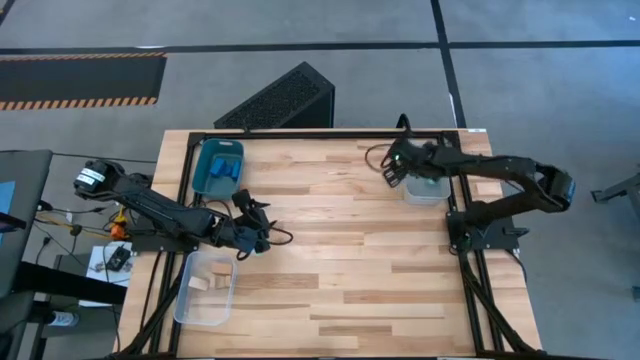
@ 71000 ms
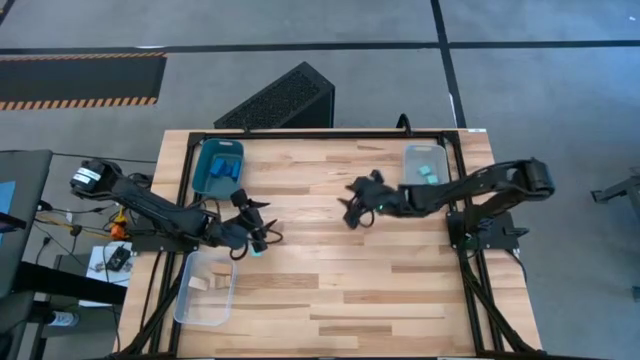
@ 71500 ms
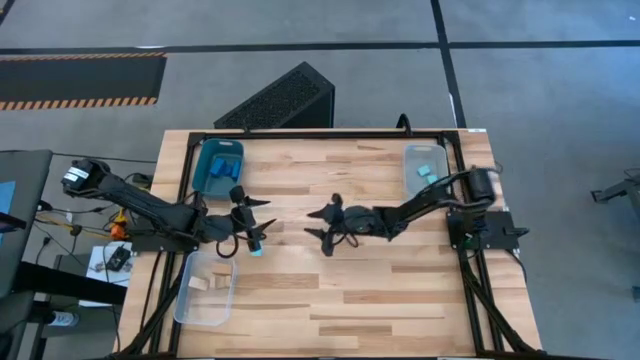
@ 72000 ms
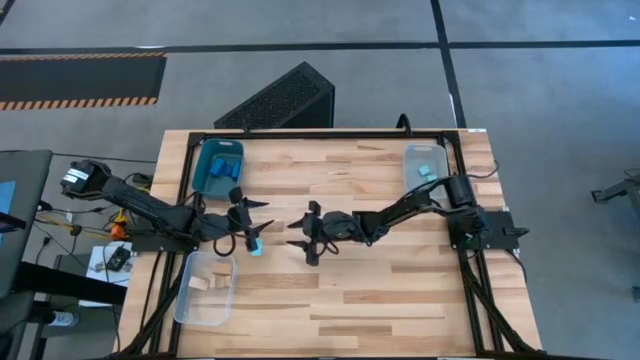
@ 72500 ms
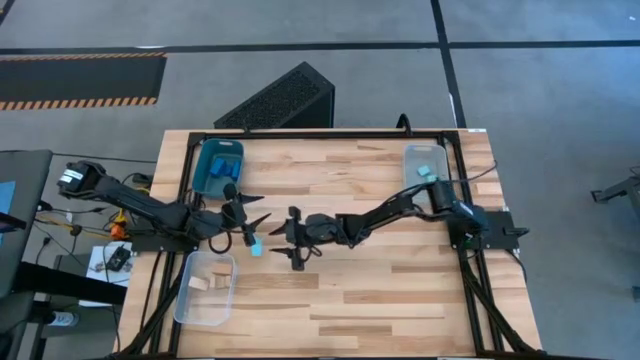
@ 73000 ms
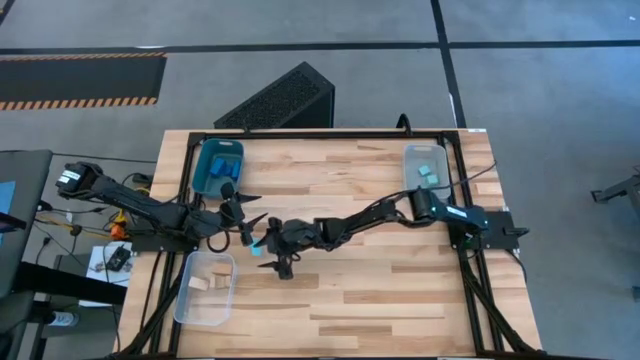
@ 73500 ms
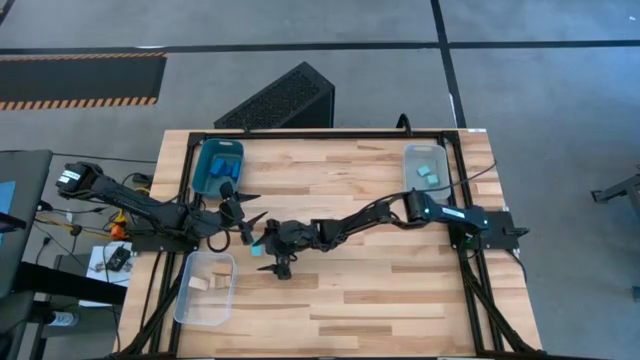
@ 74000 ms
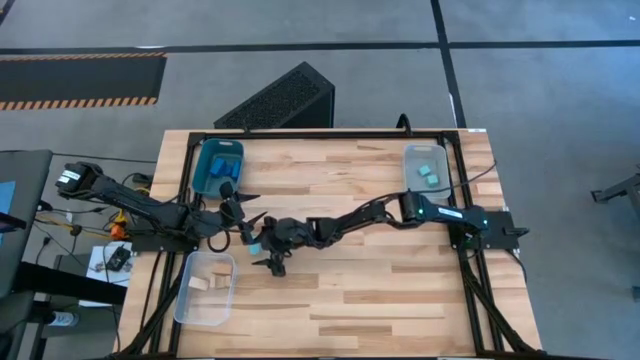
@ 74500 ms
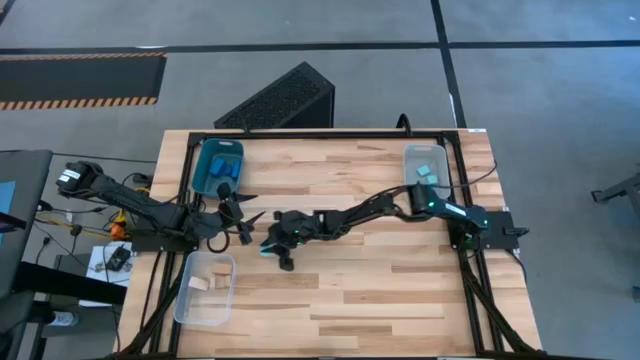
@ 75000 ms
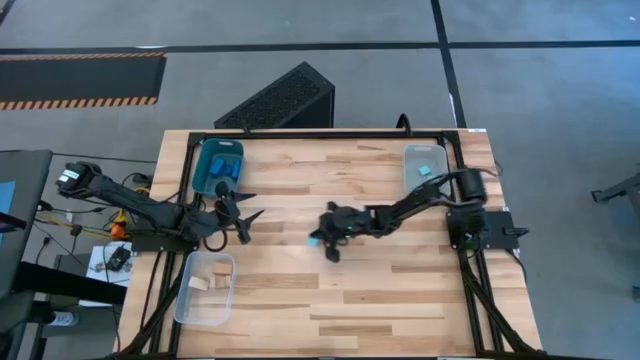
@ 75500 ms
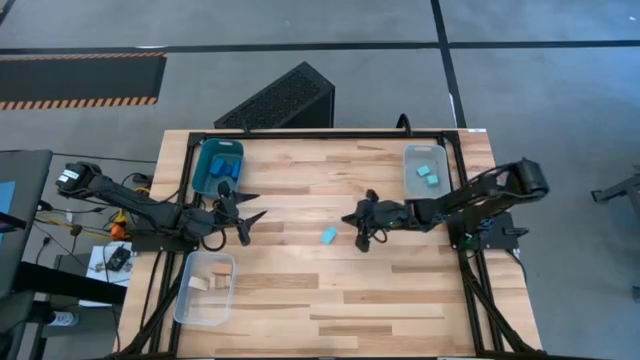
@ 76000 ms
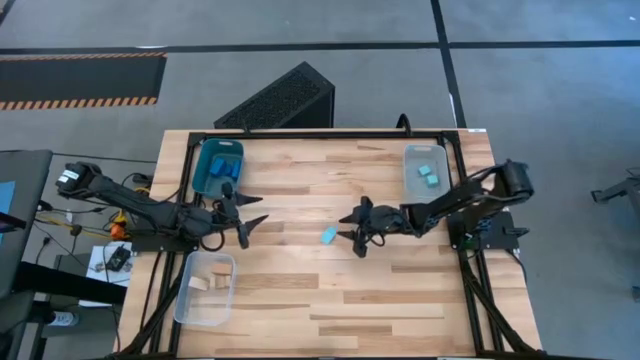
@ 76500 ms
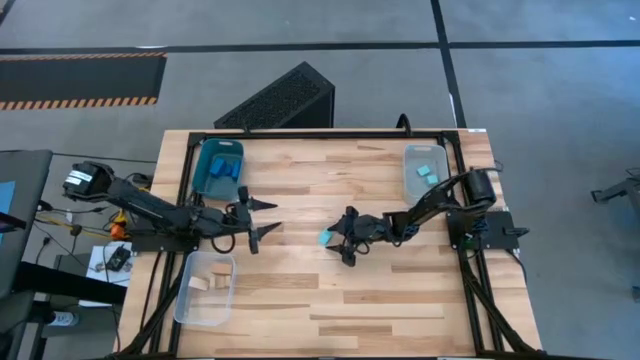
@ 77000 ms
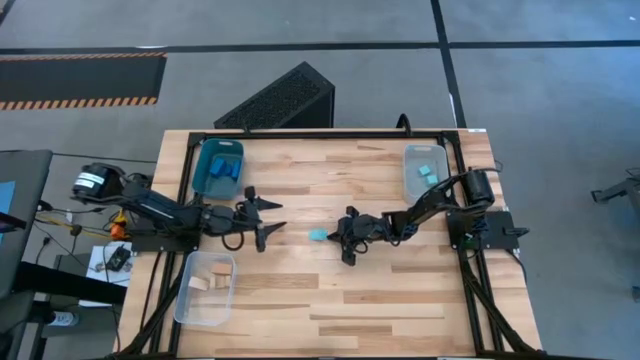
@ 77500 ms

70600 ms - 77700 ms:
Task: Sort & place blocks by color
Put the light blue block into the grey bin

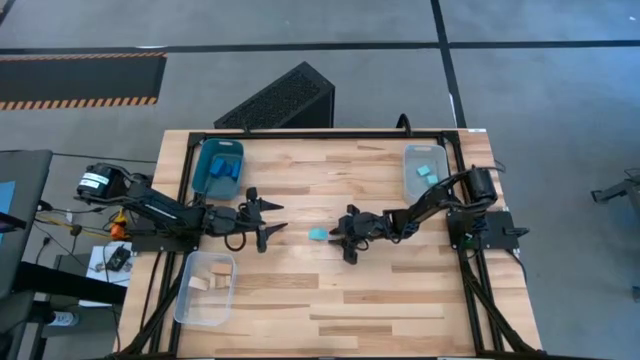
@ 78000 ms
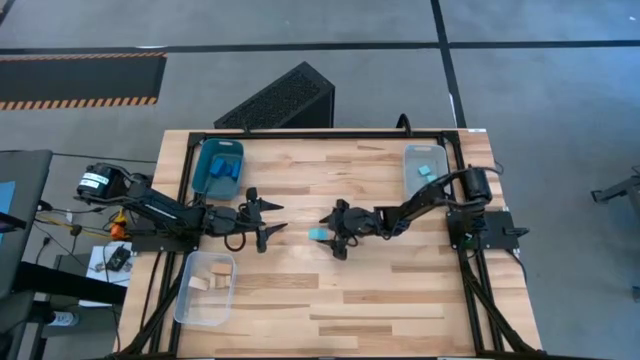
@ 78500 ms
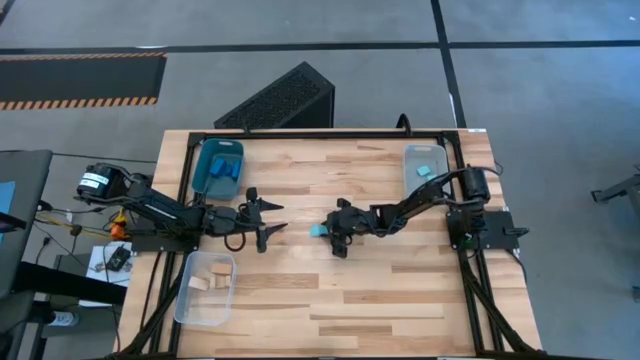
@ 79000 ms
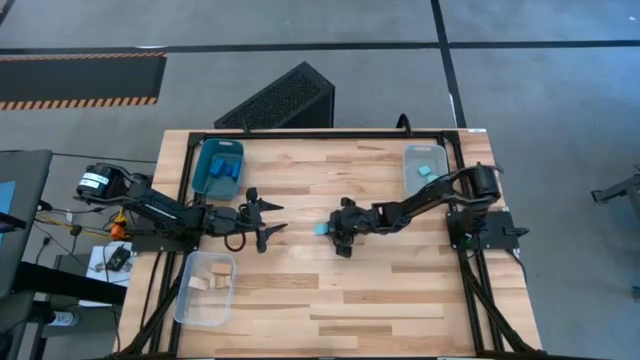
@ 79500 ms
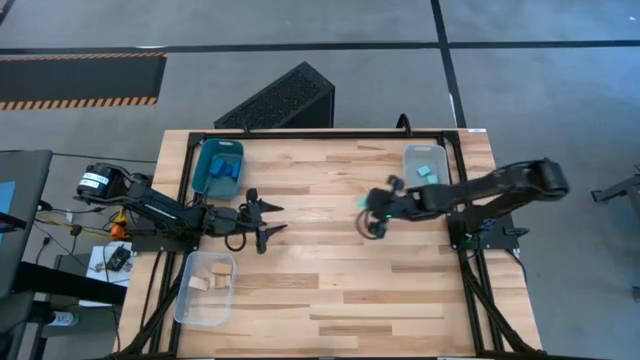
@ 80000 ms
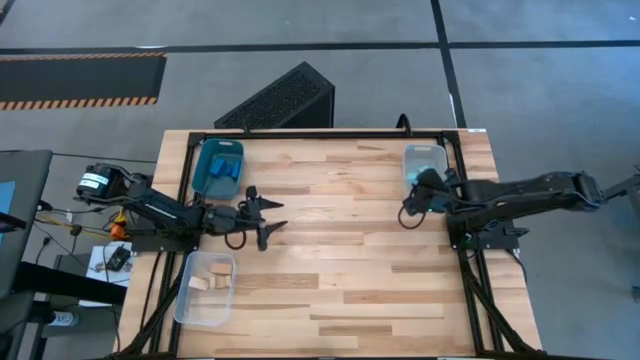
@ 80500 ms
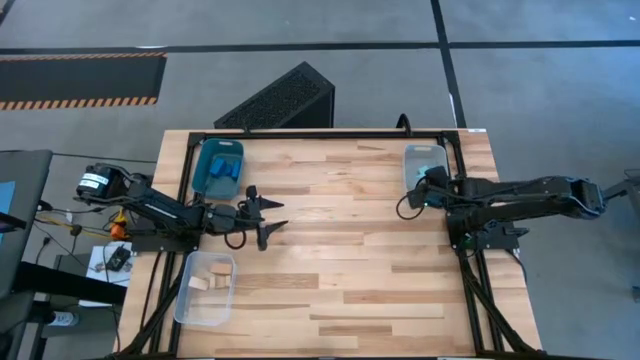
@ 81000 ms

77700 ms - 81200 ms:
Put the light blue block into the grey bin

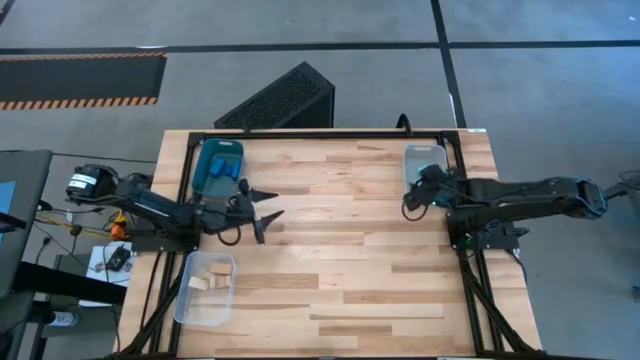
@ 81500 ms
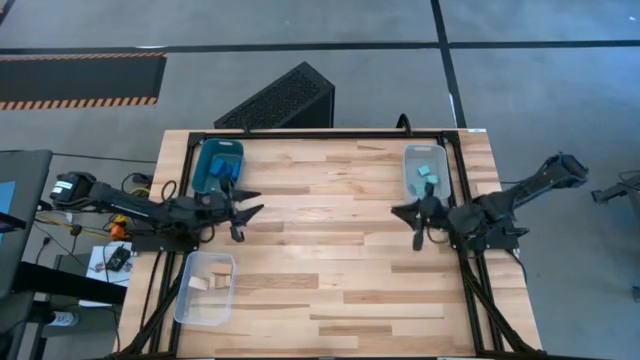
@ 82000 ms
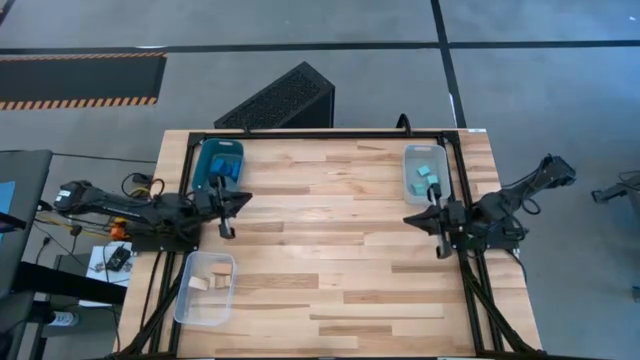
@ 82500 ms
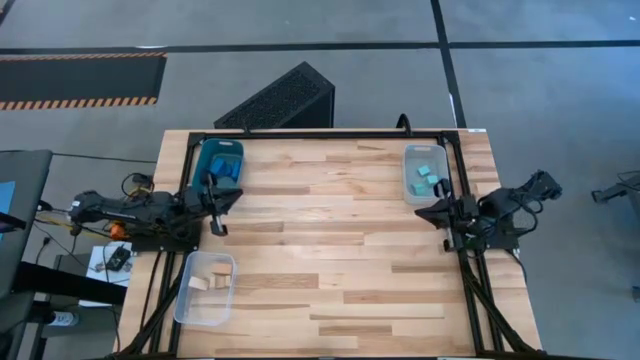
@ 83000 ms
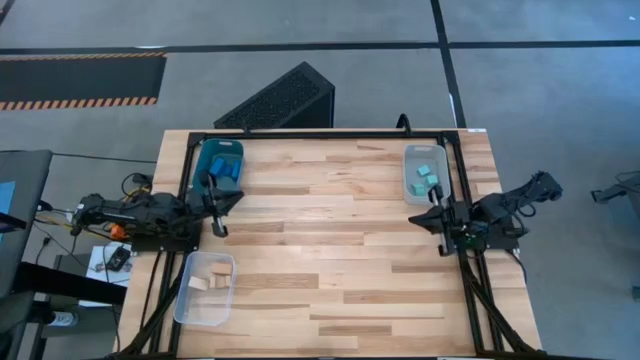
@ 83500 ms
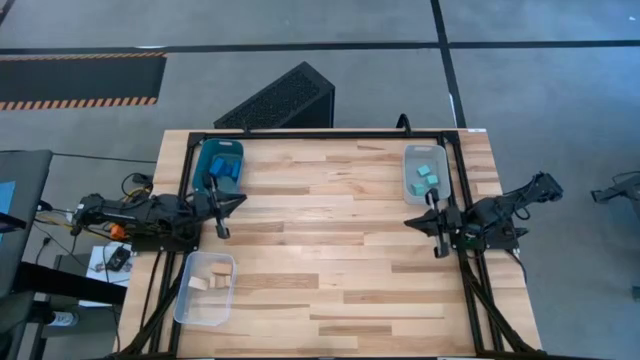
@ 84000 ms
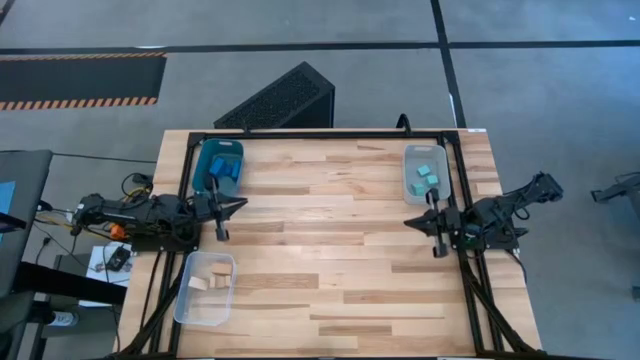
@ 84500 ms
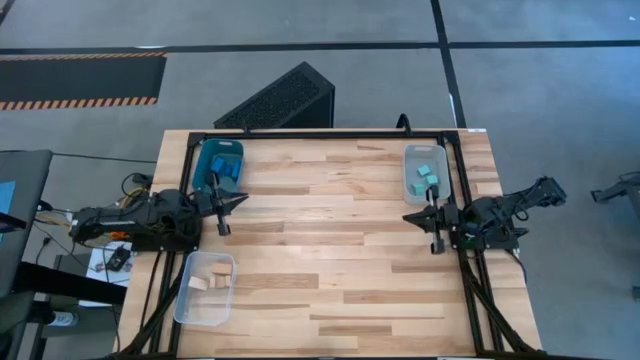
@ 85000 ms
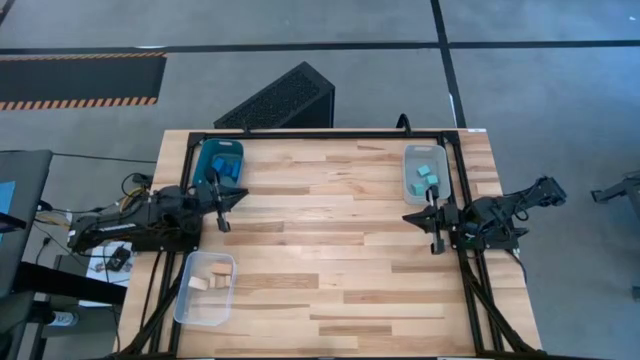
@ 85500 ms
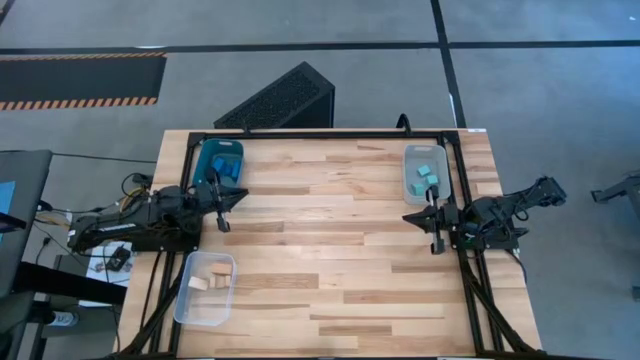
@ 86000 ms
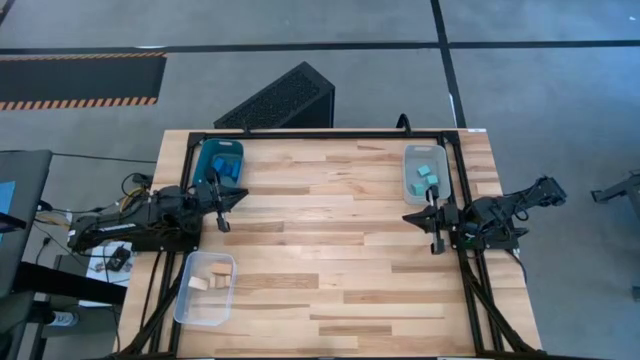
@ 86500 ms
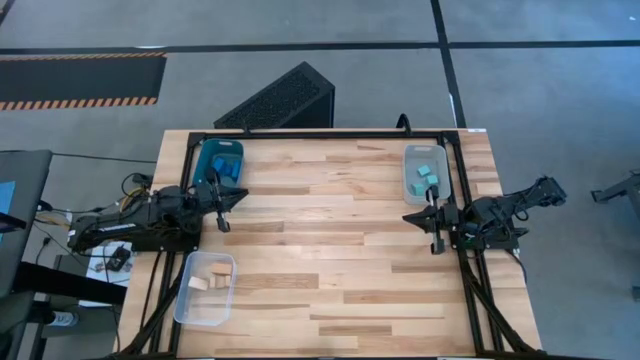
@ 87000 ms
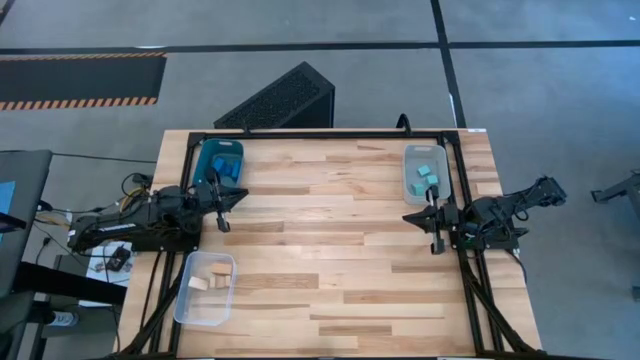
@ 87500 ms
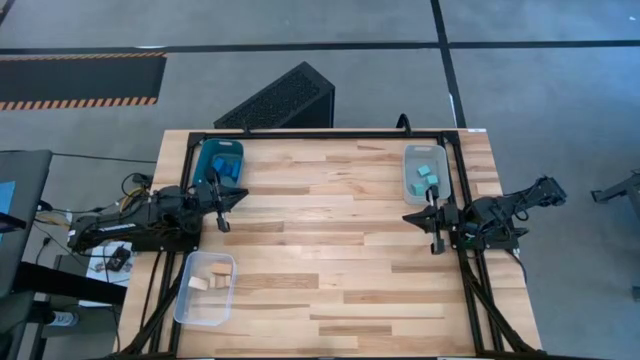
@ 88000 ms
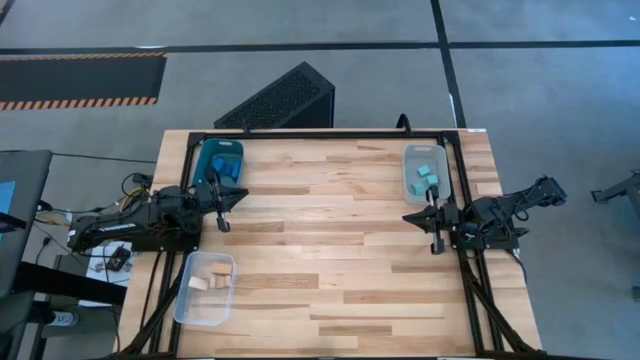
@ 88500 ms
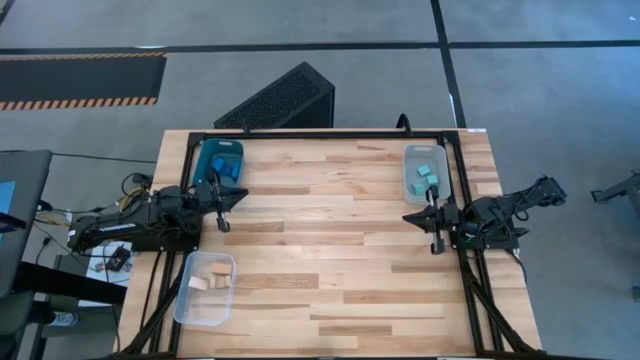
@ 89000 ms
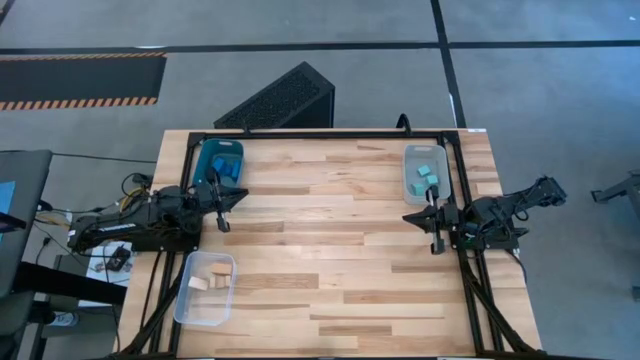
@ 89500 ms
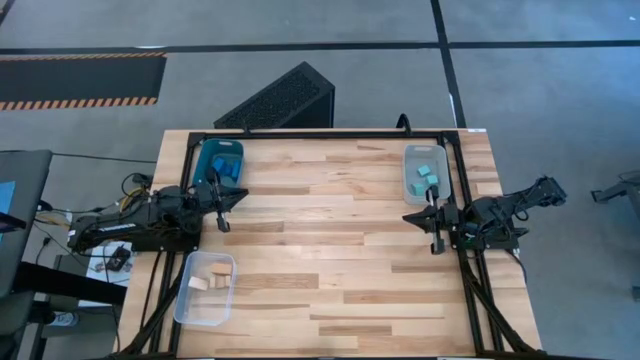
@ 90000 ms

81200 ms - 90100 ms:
Return to Home Position

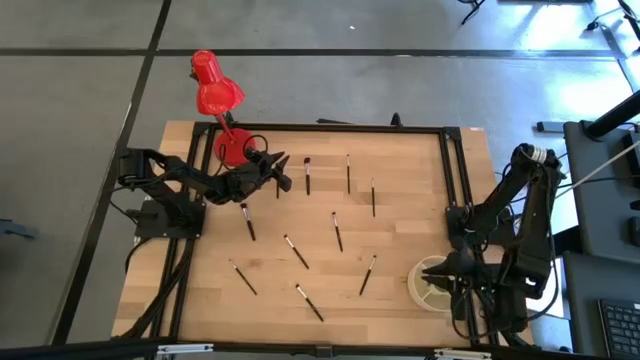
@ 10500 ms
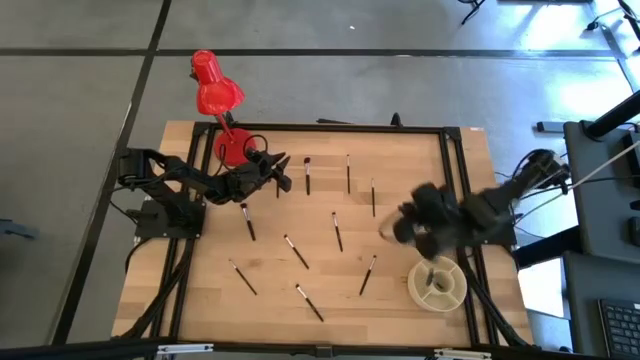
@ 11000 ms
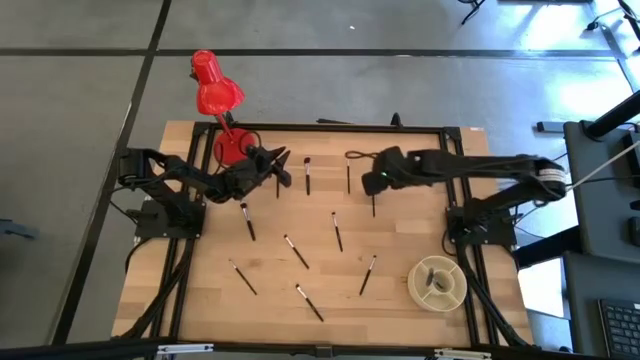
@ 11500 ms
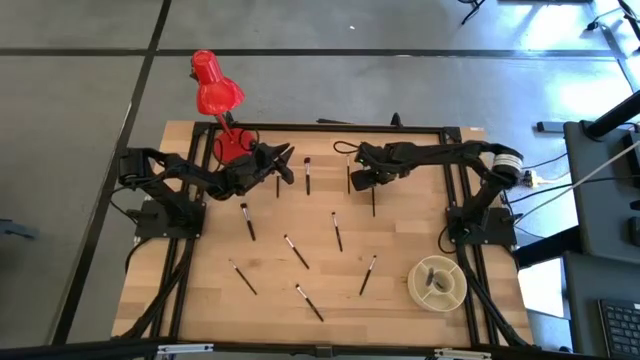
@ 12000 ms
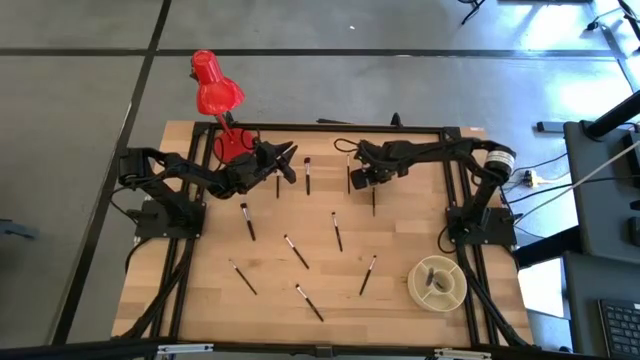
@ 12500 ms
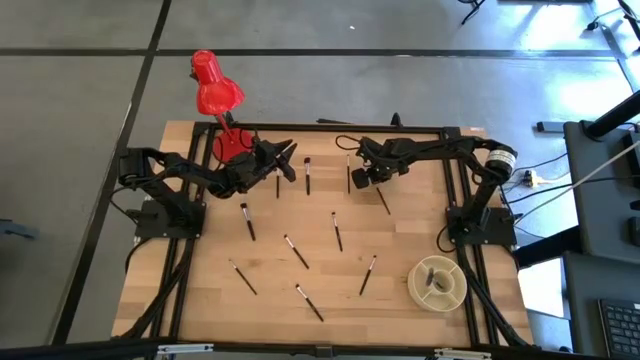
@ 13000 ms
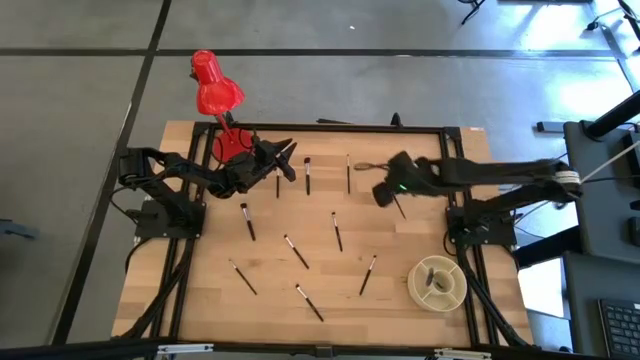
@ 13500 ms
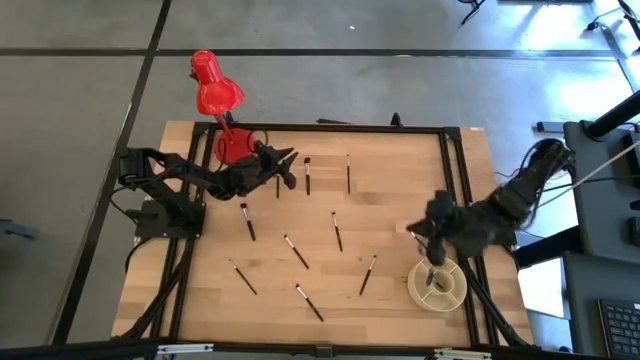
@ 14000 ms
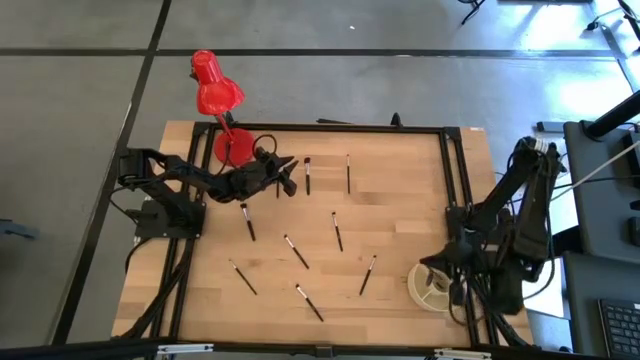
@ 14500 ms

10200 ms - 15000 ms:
Task: Pick & Place Makeup Supplies
Put the makeup brush into the organizer
